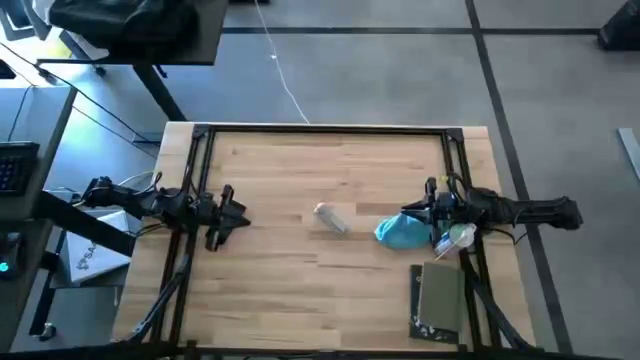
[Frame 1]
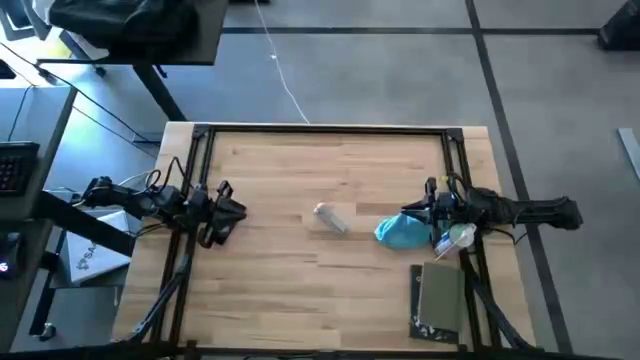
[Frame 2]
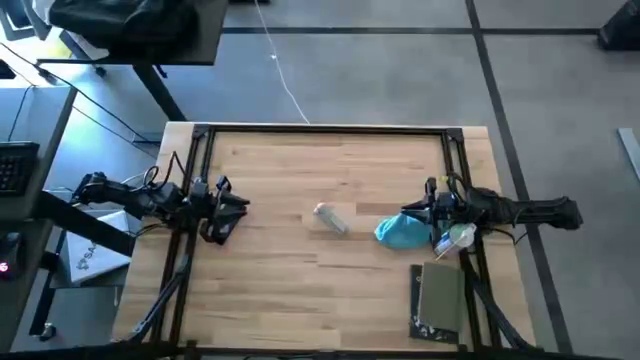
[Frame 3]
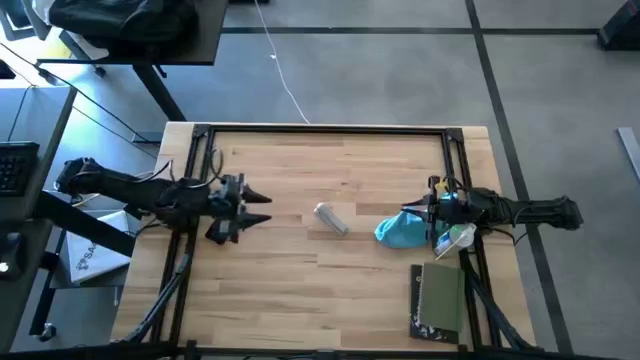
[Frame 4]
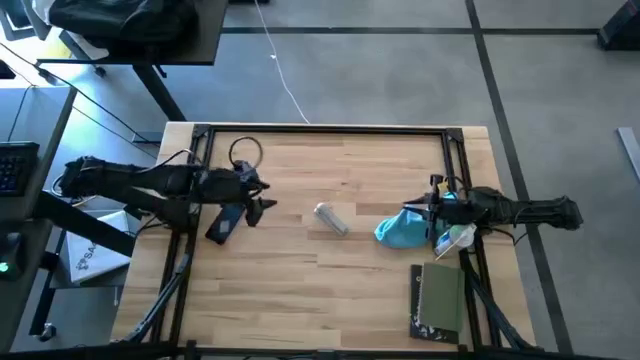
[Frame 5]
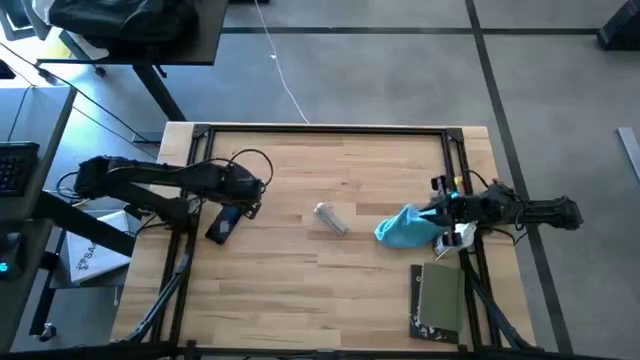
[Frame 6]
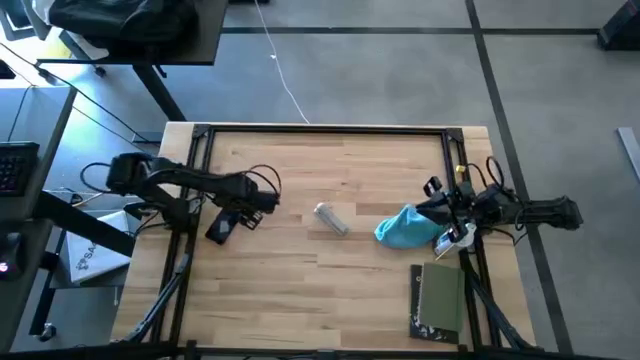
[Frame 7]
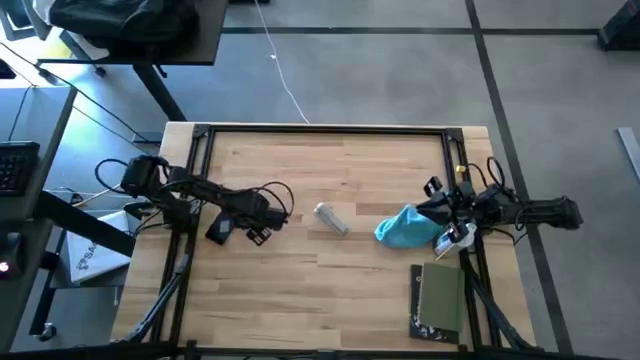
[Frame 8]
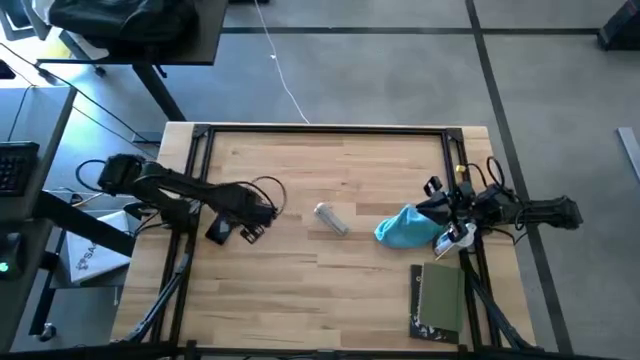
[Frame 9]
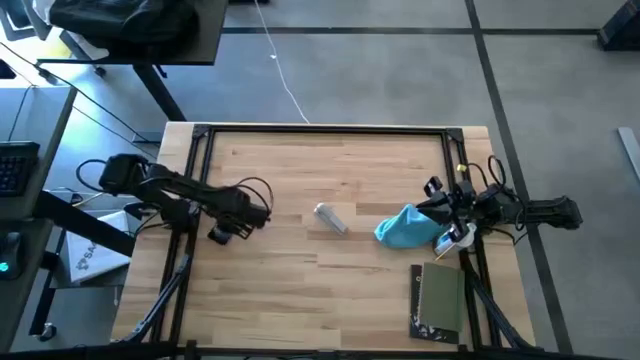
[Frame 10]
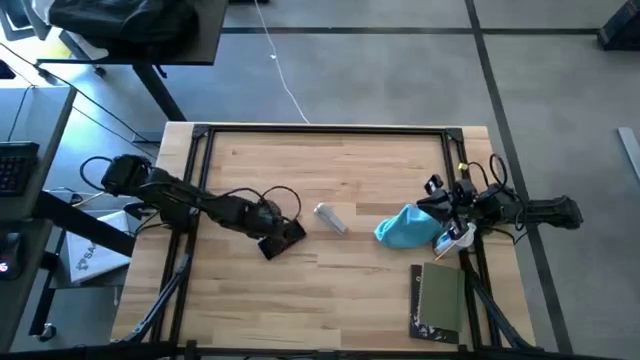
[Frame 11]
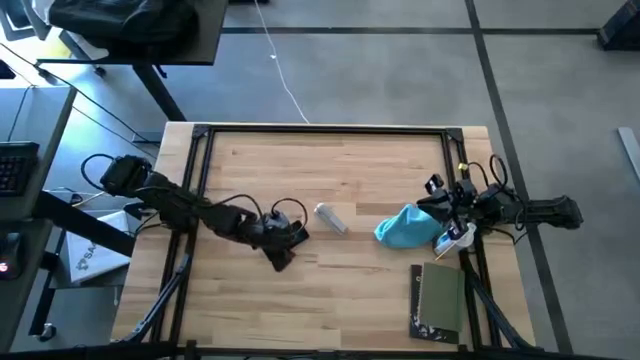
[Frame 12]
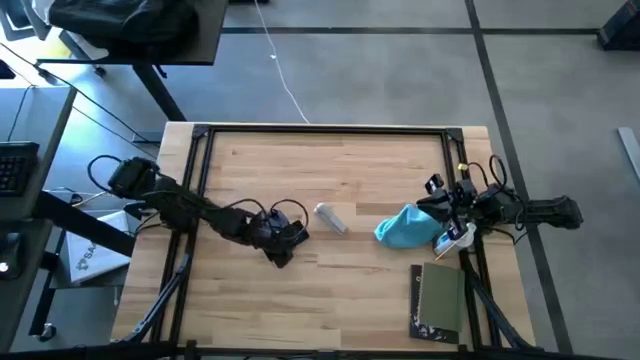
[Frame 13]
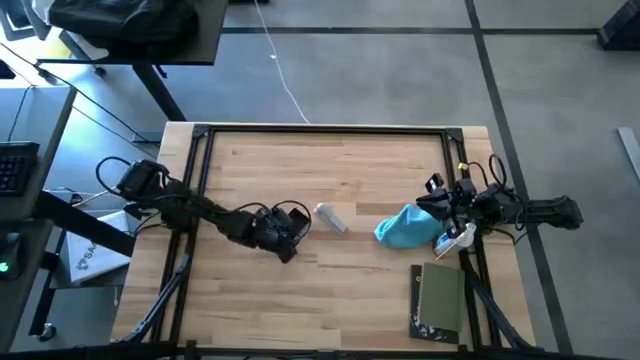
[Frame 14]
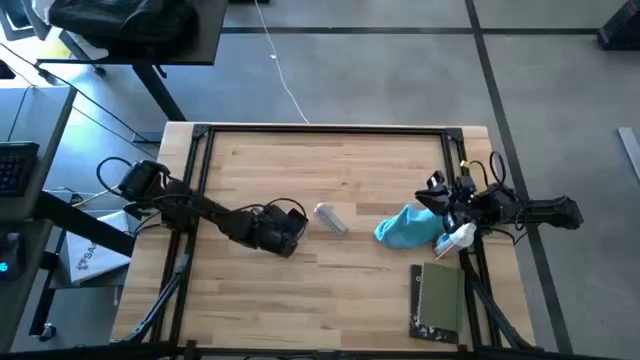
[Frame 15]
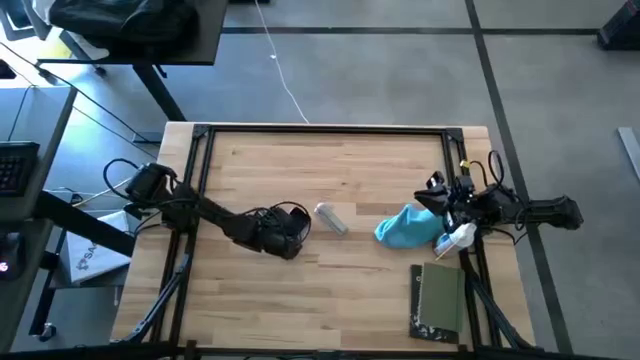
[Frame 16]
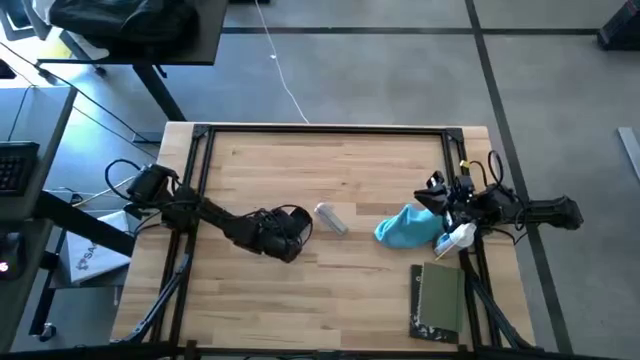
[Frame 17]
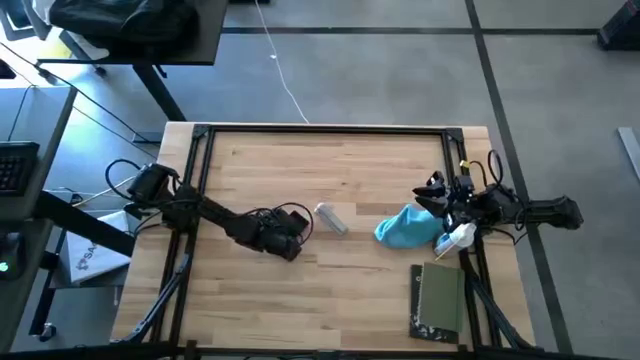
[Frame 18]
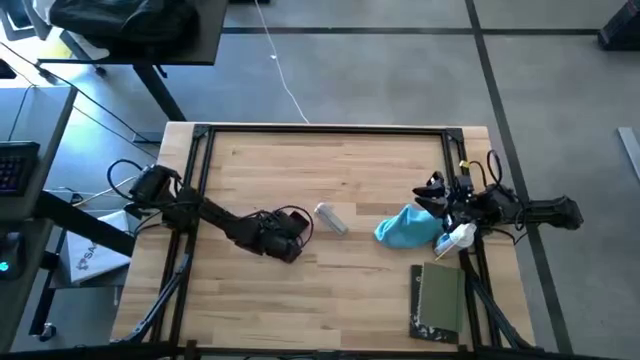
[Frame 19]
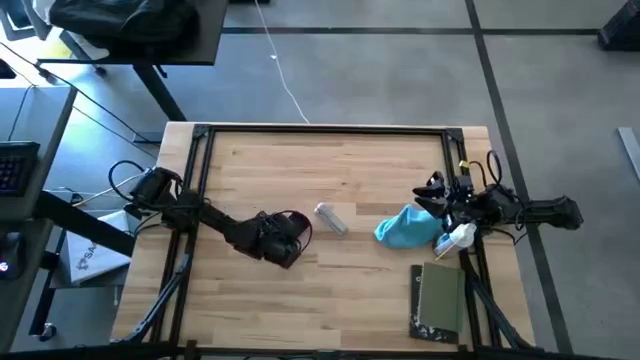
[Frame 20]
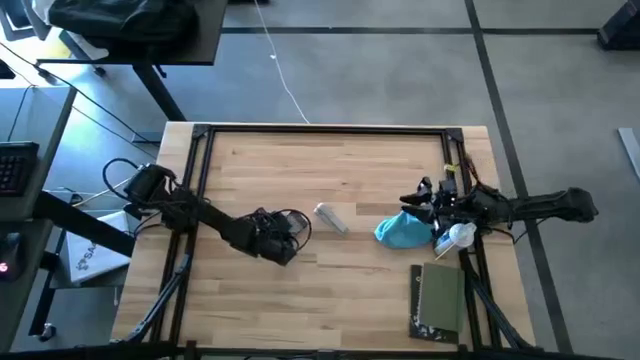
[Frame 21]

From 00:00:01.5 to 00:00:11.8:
Task: Apply microfiber cloth
Spray the pink phone with the spray bottle

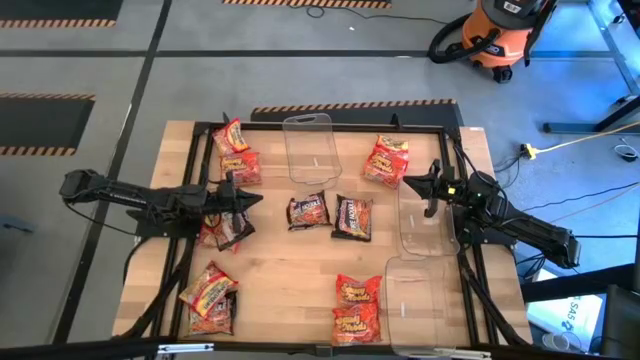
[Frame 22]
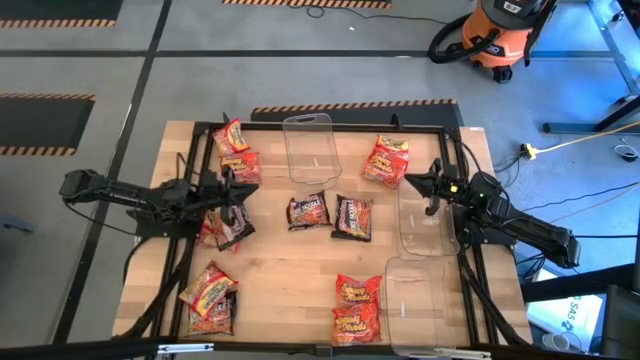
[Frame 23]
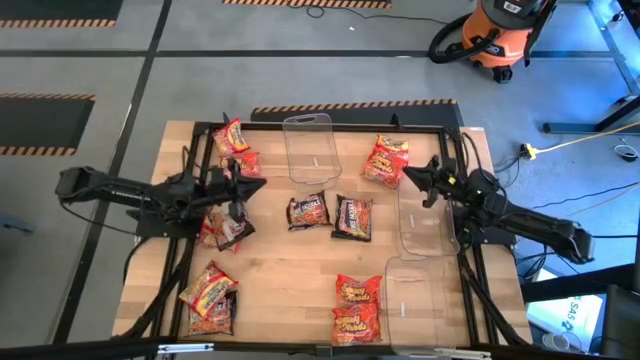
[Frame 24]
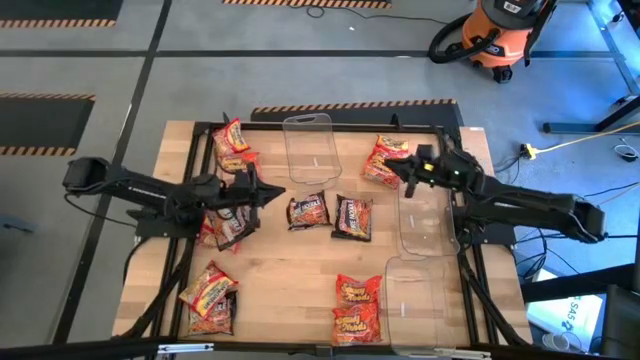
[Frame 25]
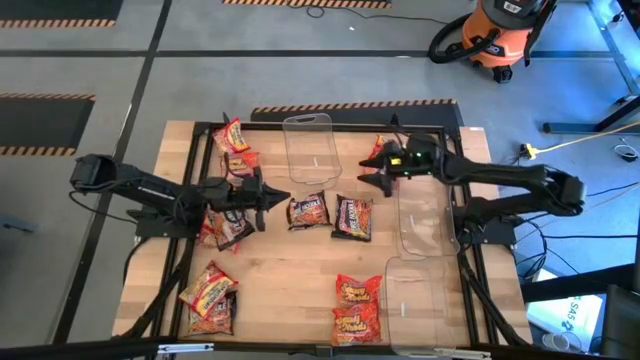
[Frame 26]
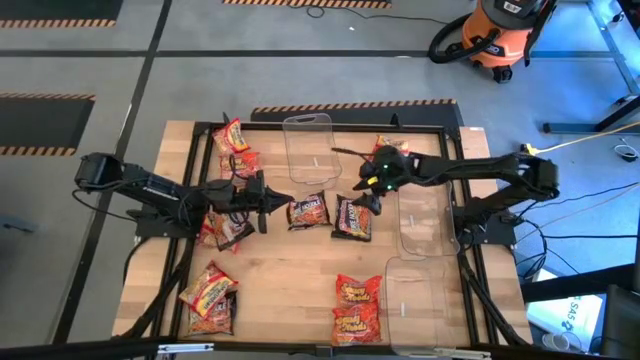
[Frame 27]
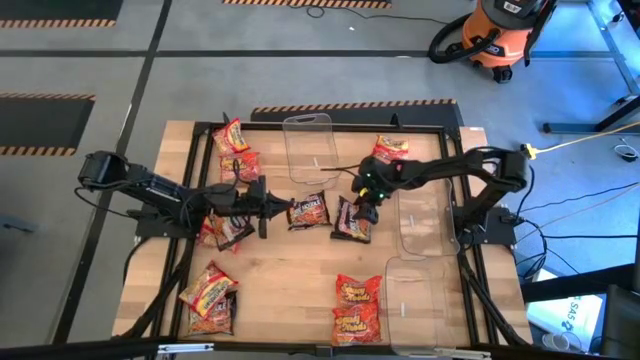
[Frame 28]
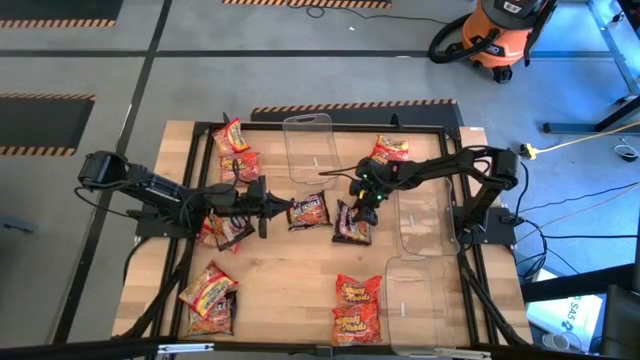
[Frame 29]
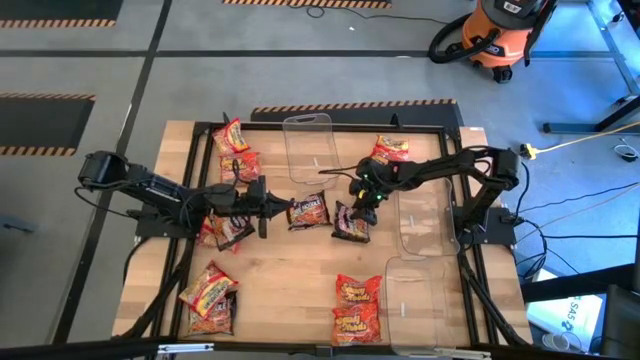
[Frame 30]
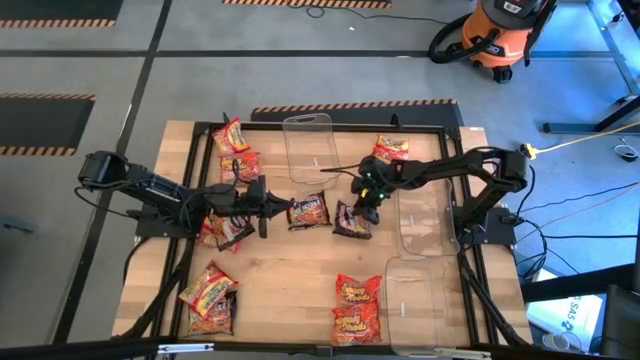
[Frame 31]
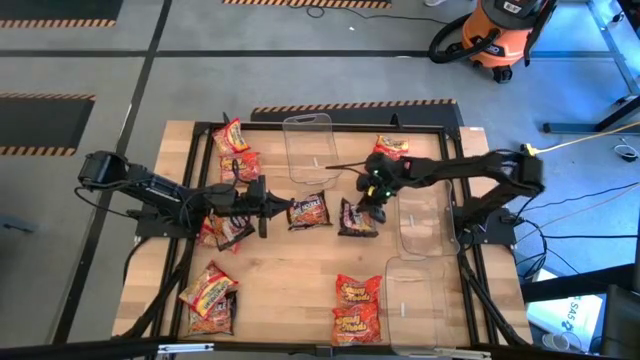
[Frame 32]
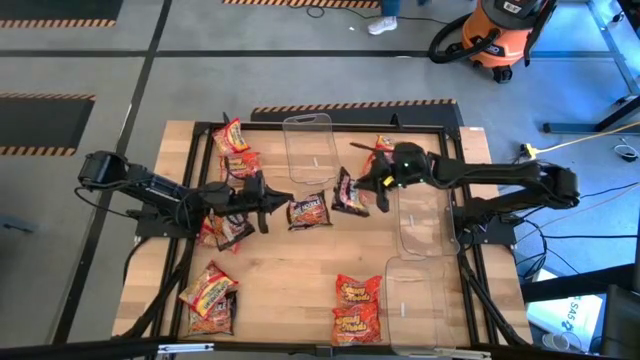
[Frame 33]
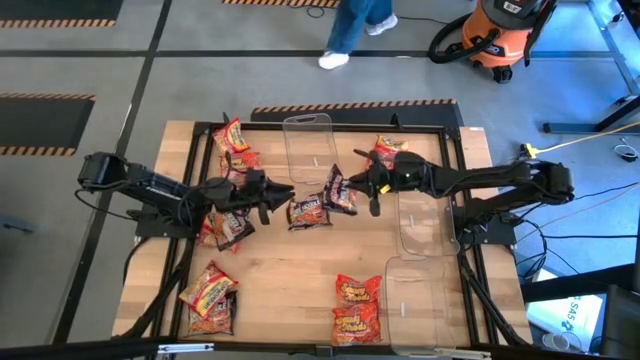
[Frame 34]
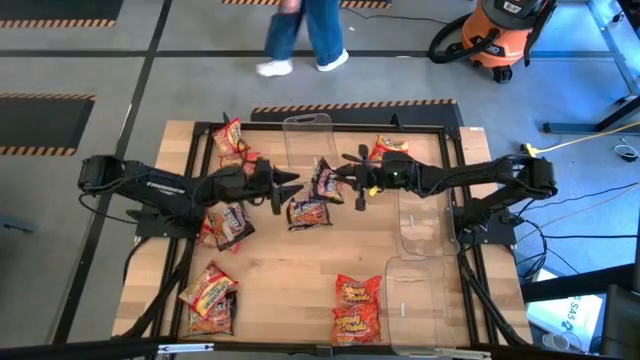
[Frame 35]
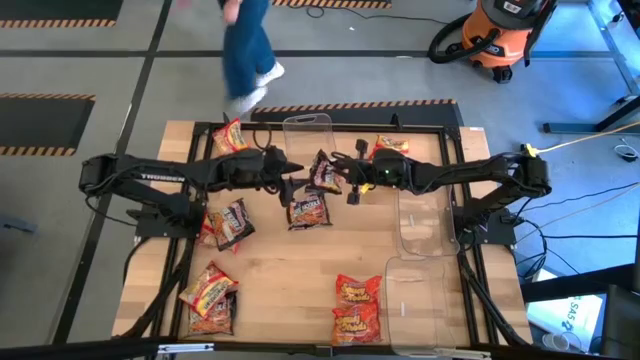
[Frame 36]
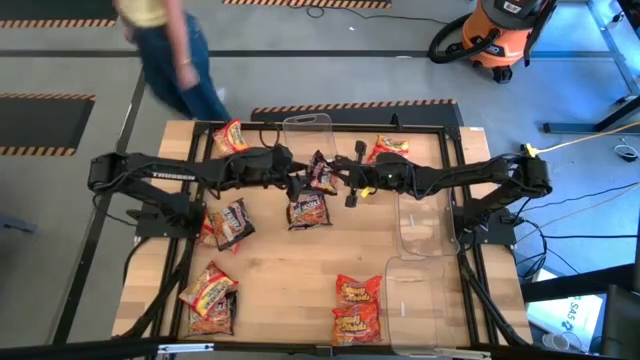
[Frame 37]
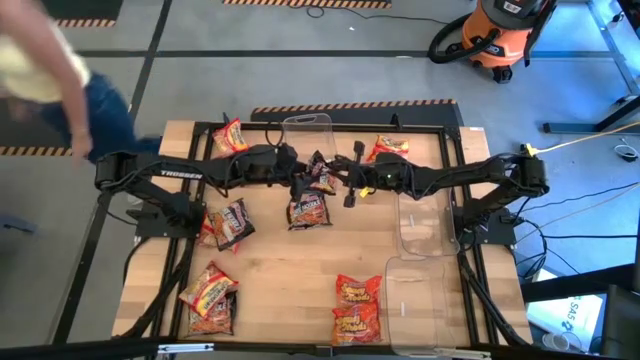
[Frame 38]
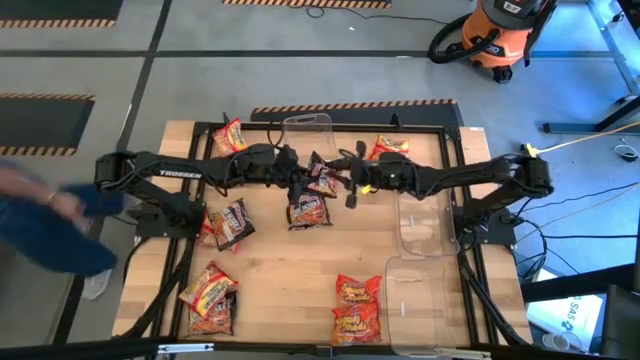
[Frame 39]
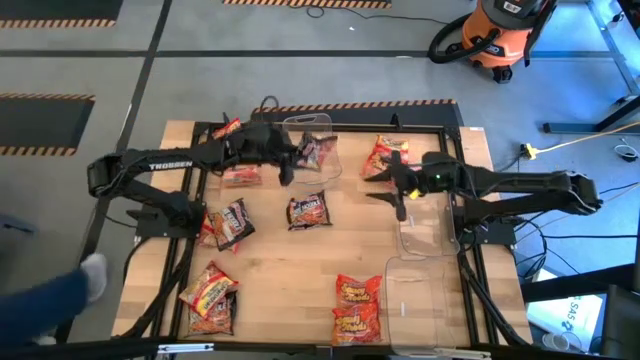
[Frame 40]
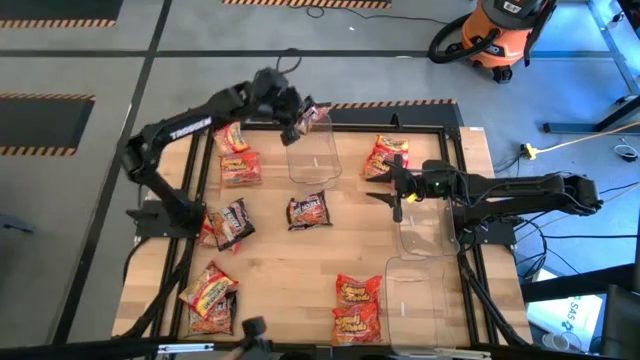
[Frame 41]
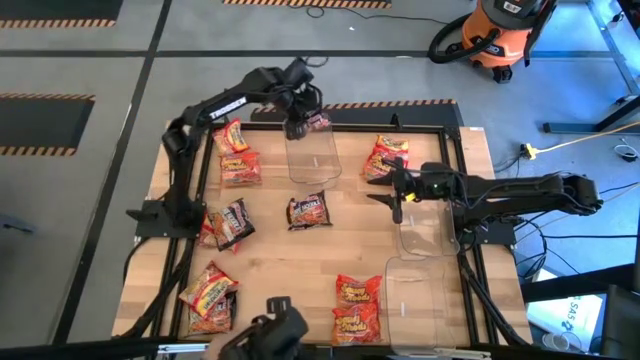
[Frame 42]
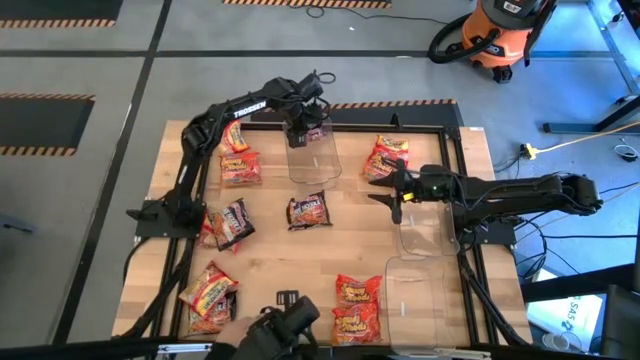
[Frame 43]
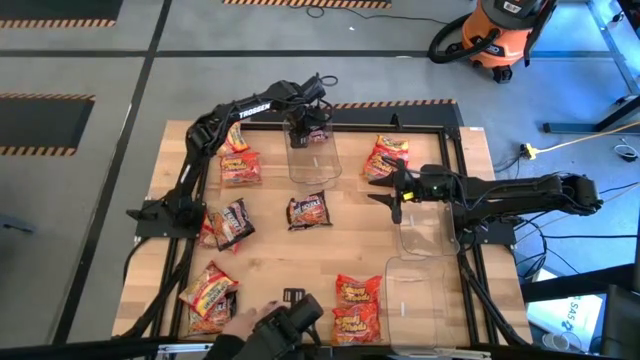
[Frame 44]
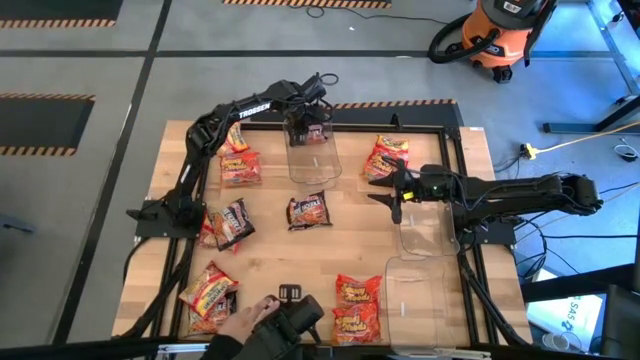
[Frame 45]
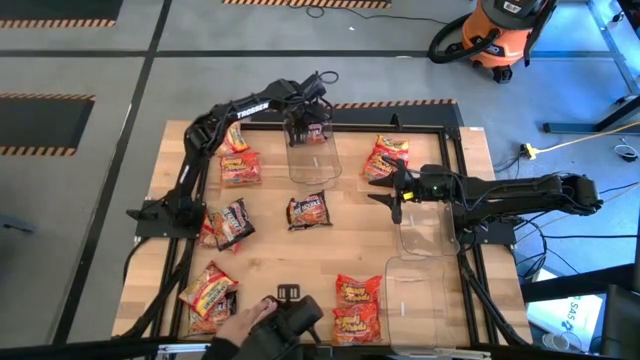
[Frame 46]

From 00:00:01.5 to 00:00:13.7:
Task: Sort Maruchan noodles
Put the black noodle pack into the top transparent bin
